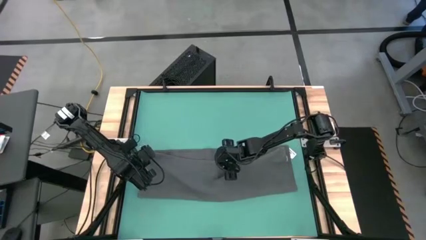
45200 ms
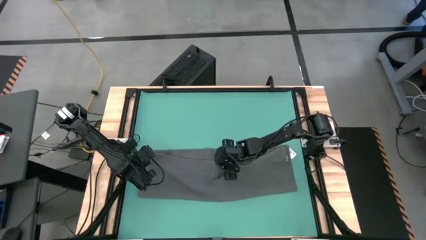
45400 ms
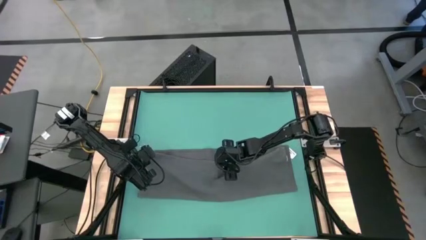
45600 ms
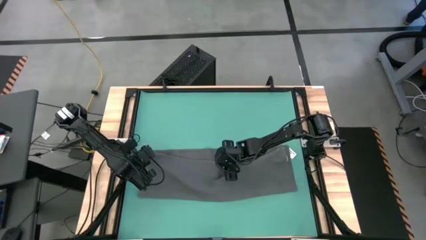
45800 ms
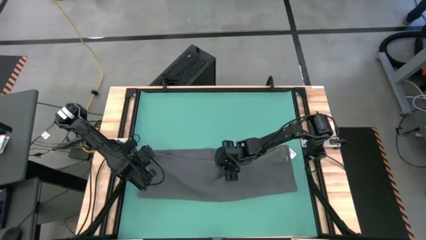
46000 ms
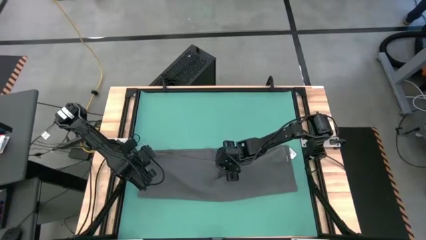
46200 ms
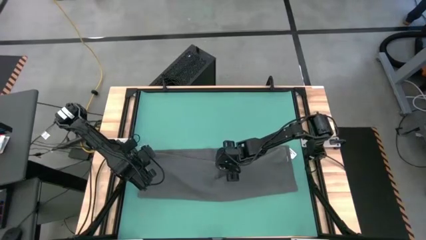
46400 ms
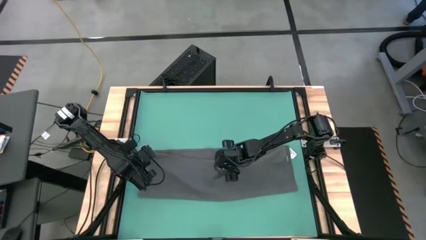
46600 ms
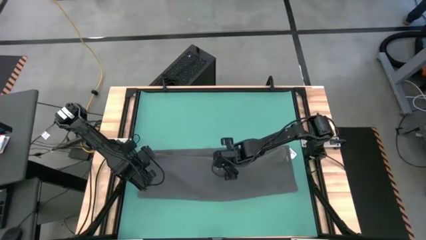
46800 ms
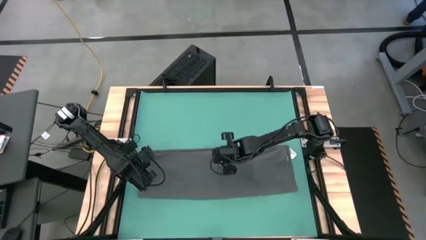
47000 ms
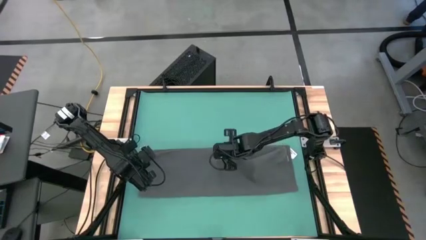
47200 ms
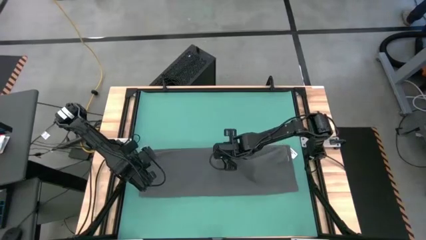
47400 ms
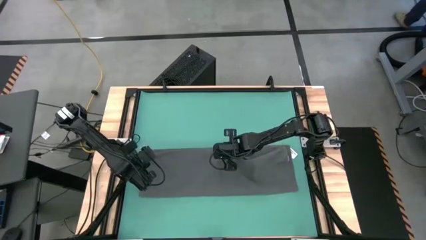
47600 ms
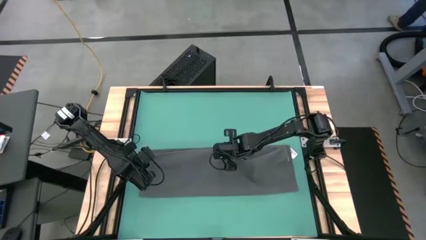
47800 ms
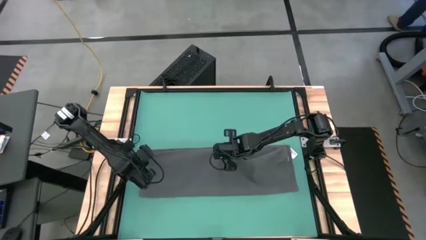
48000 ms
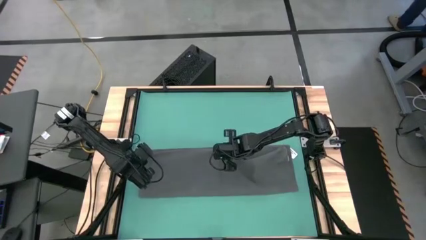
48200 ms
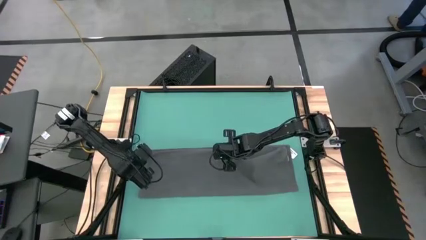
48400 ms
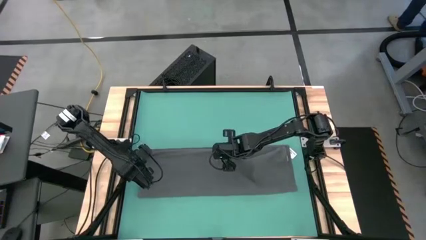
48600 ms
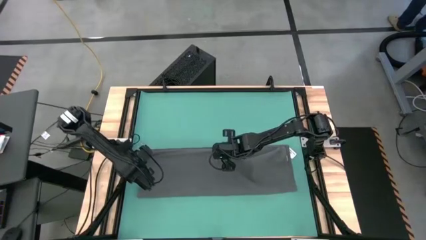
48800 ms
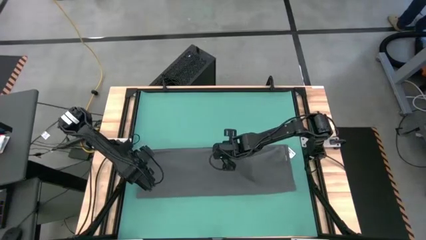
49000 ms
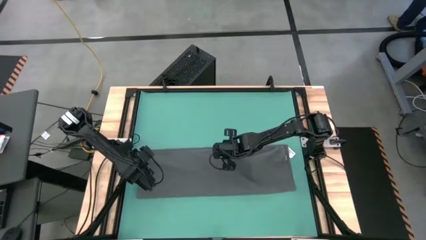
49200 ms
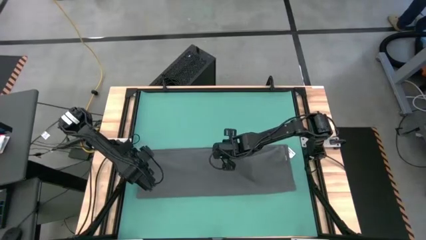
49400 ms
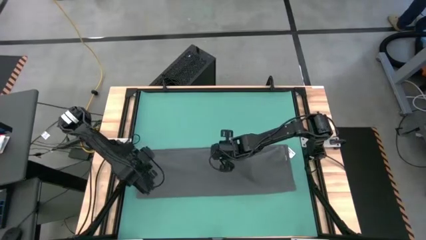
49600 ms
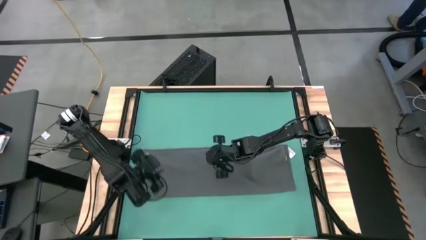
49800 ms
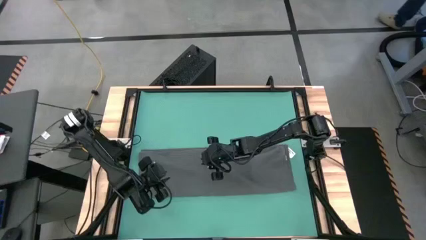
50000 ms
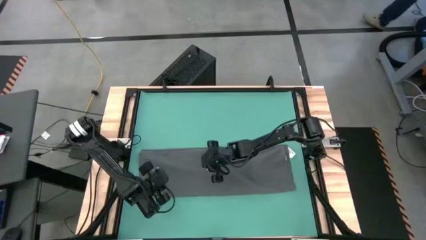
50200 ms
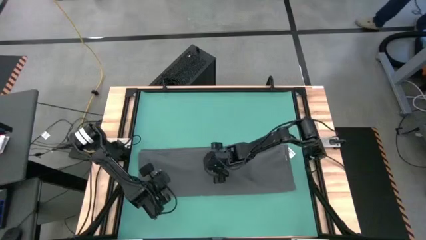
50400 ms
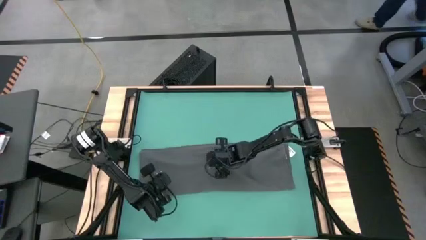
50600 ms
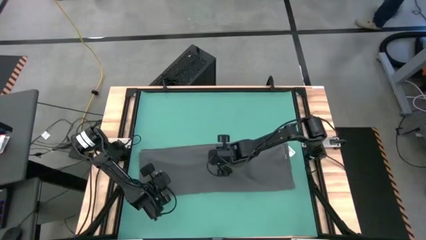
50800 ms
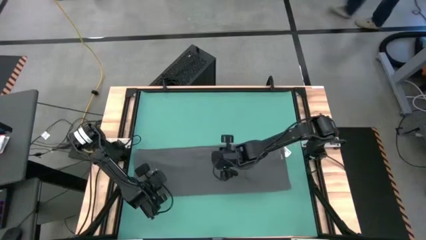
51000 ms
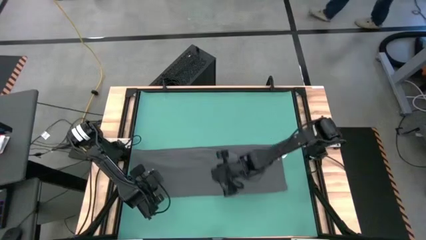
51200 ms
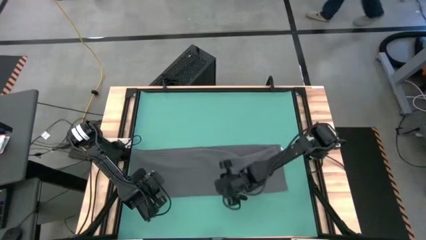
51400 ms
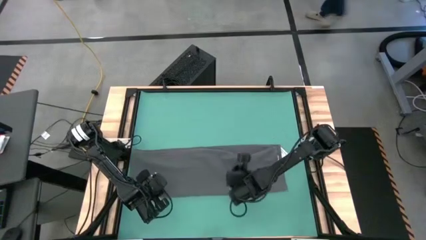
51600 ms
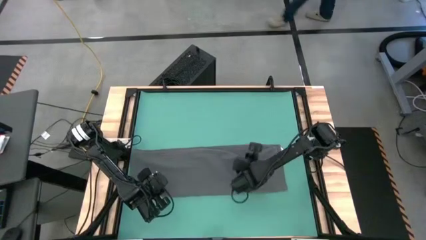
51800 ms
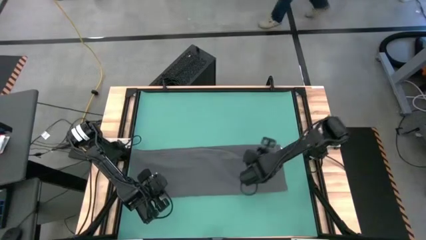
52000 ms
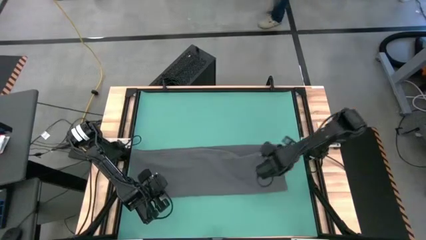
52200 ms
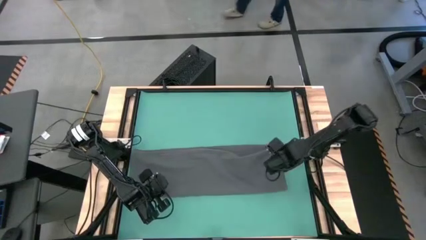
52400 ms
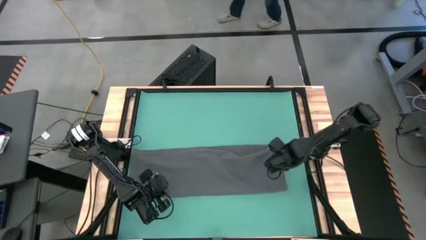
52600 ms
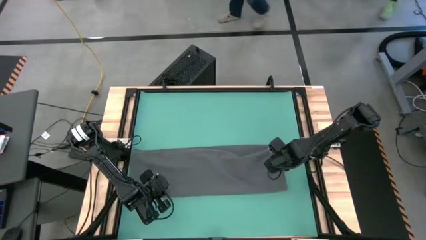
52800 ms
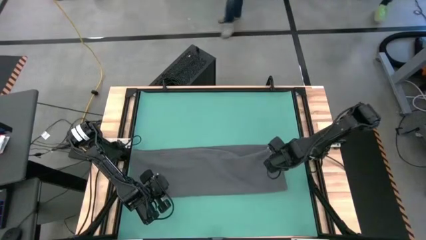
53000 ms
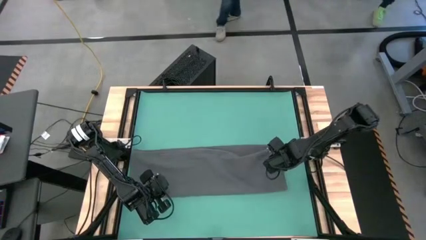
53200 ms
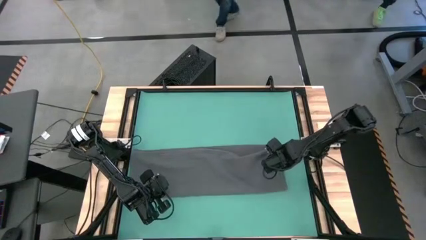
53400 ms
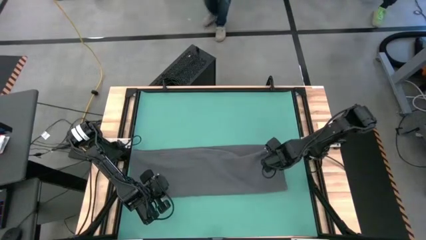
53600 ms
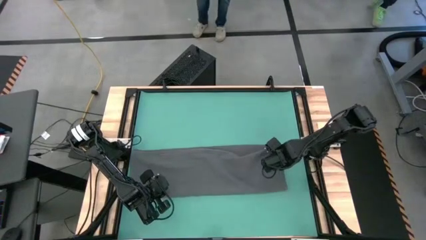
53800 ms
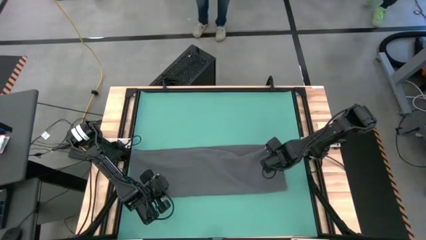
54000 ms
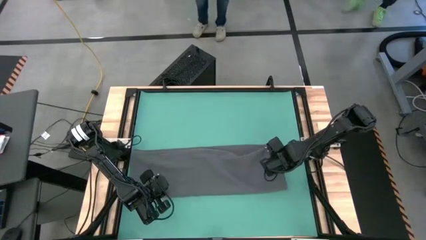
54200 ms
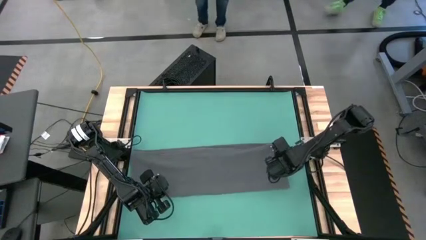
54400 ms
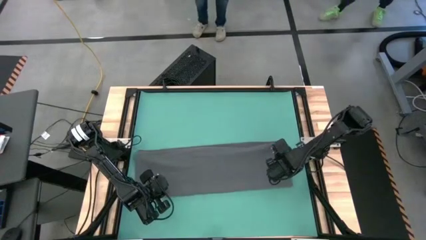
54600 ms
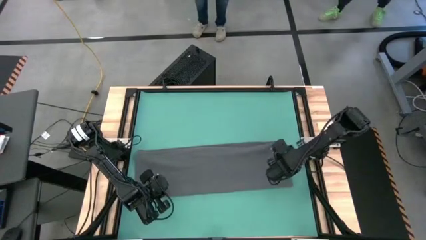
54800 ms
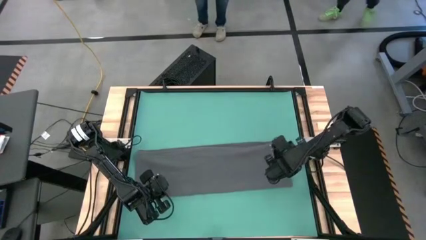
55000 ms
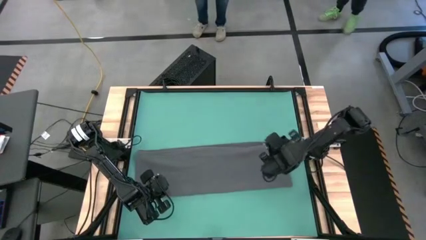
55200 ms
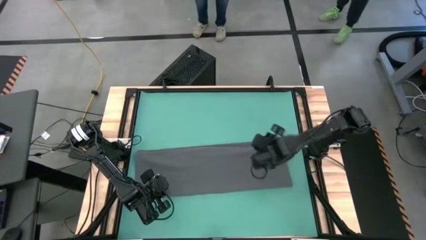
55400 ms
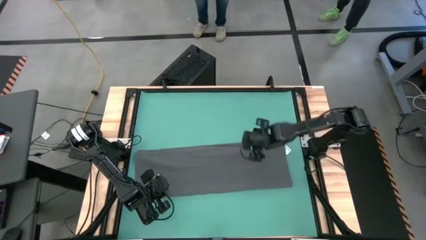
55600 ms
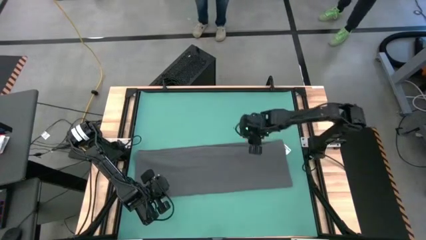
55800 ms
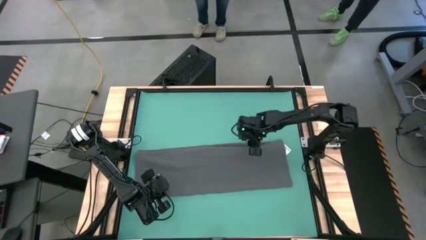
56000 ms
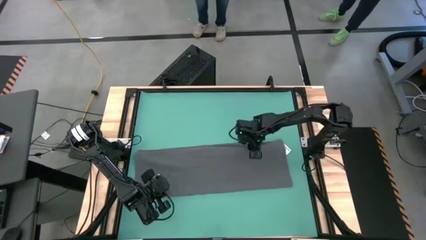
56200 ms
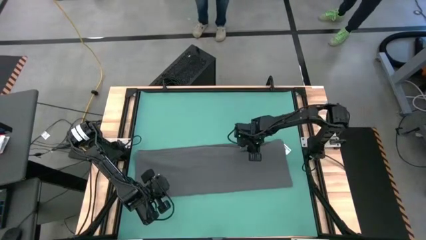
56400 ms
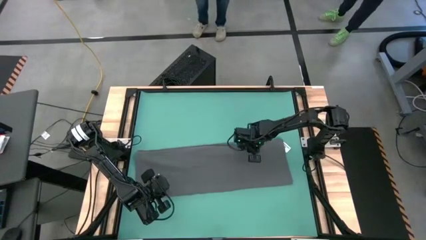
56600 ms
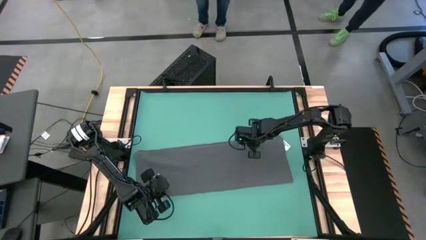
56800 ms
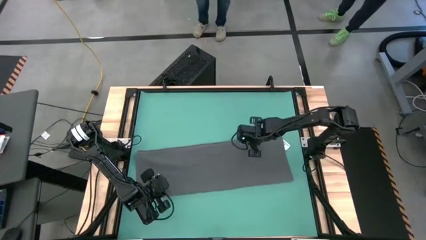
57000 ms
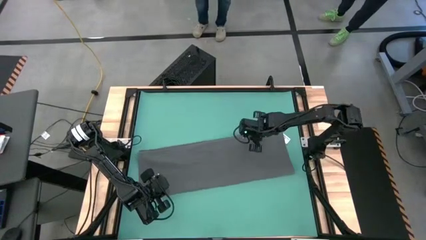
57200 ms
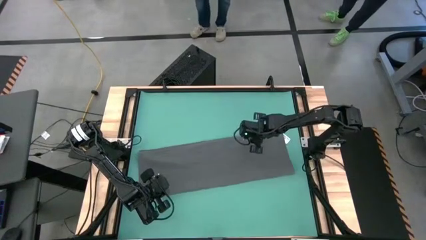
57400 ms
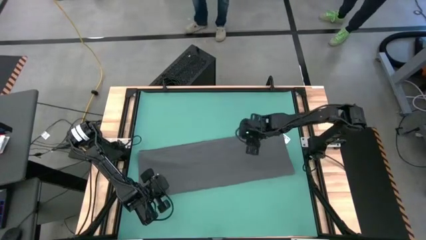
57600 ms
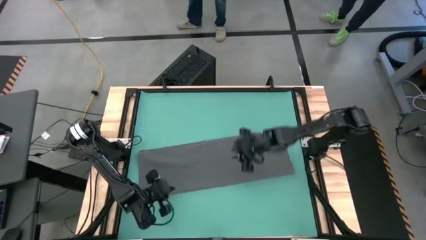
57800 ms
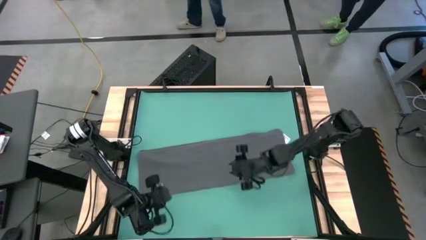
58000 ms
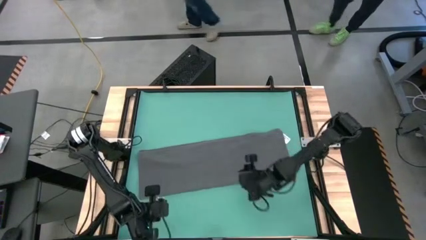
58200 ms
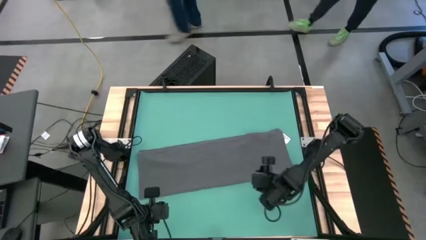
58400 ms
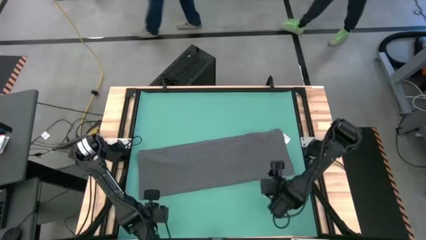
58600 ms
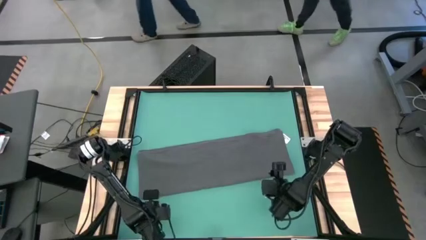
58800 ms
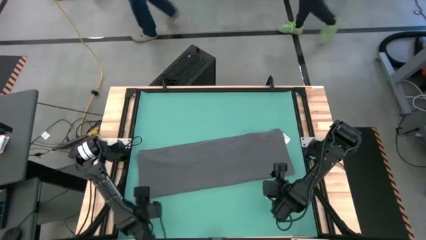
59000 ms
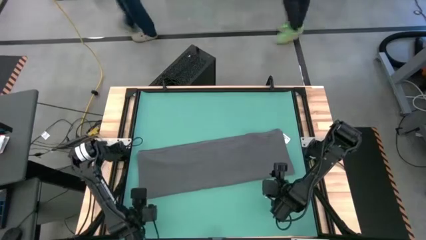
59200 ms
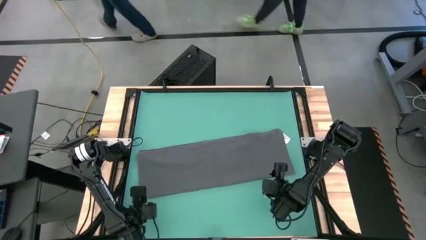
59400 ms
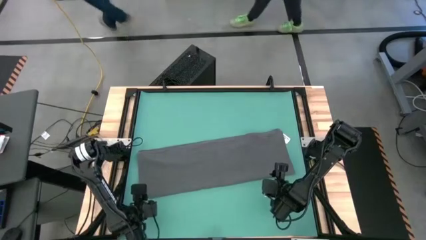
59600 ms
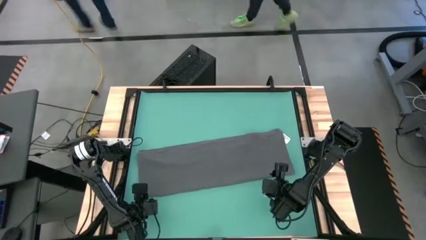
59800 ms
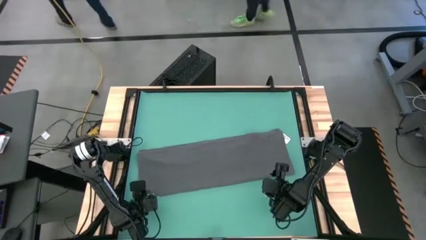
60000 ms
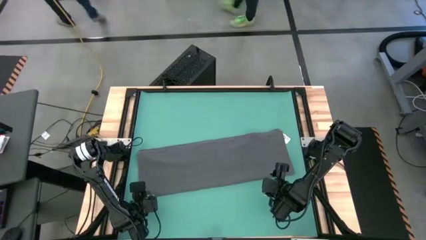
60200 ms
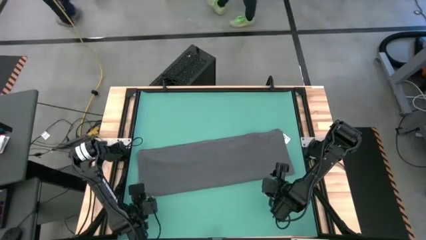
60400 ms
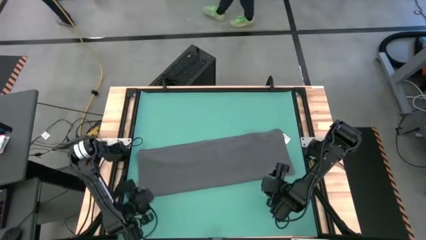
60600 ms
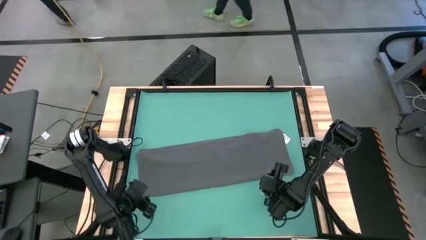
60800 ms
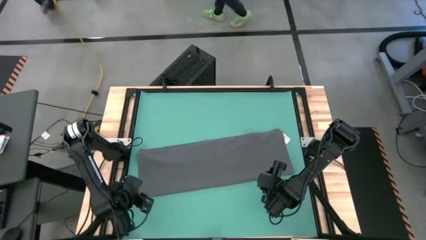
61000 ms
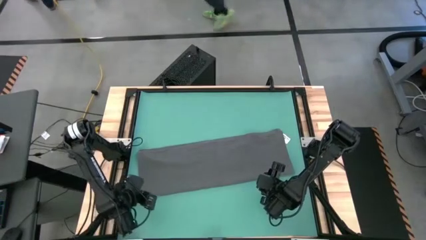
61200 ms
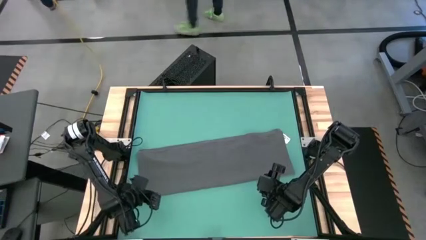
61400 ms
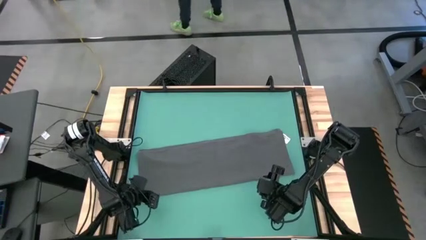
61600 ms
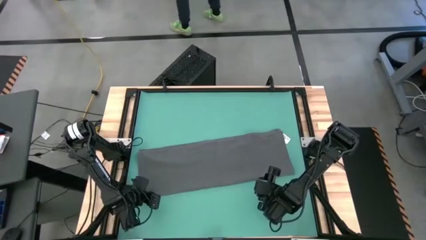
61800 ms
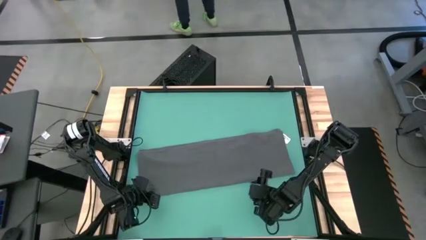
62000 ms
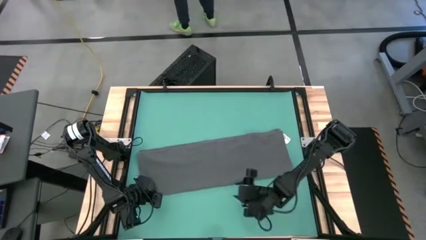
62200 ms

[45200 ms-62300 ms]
Task: Roll towel
Roll the gray towel
